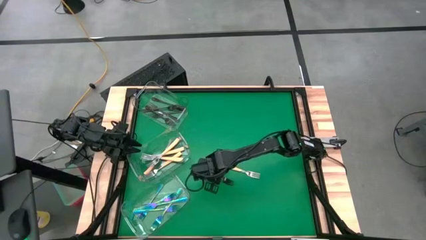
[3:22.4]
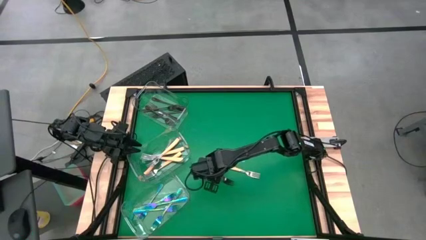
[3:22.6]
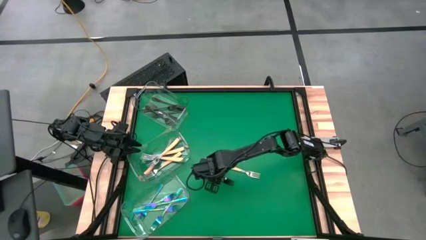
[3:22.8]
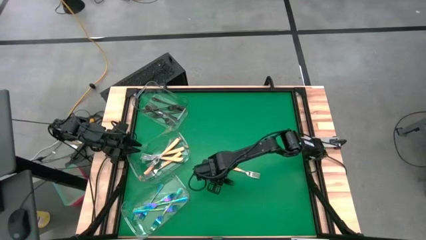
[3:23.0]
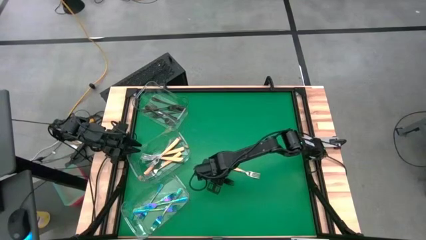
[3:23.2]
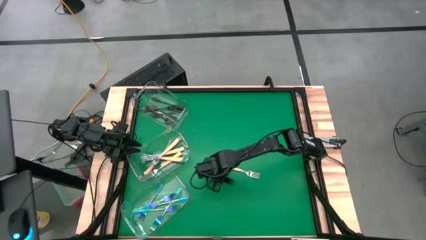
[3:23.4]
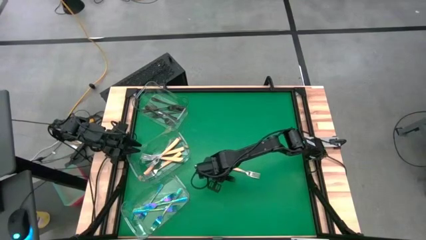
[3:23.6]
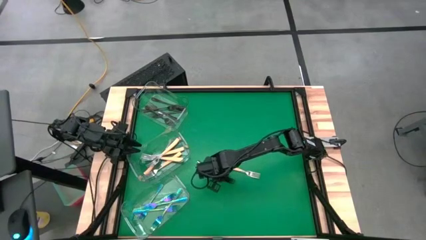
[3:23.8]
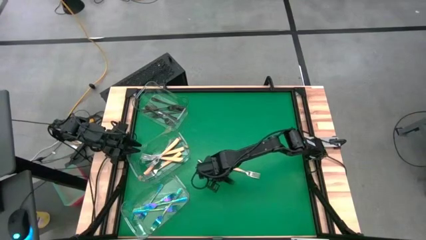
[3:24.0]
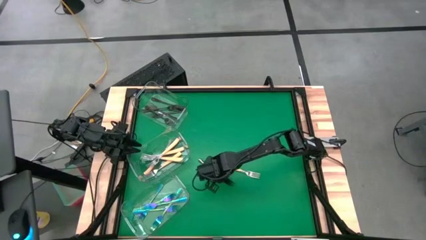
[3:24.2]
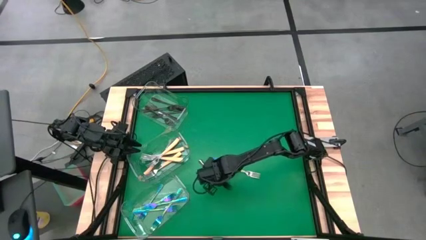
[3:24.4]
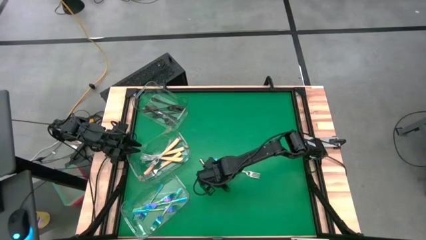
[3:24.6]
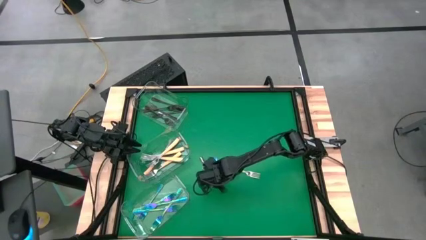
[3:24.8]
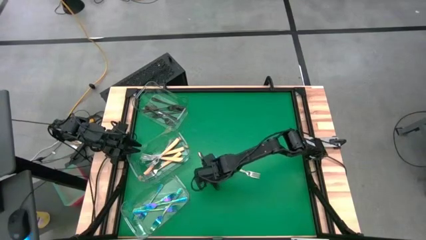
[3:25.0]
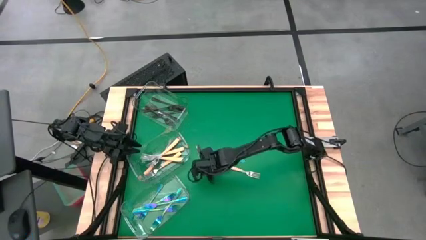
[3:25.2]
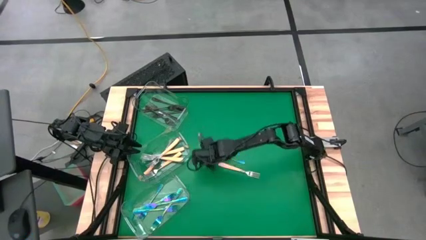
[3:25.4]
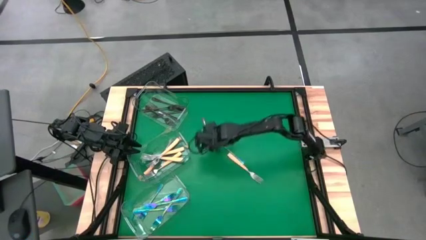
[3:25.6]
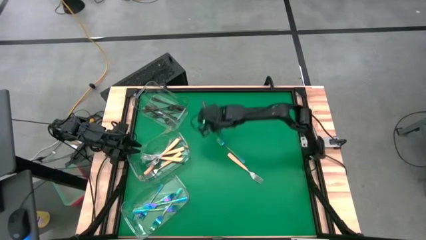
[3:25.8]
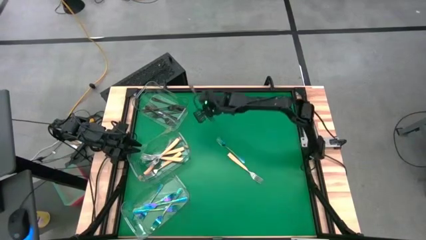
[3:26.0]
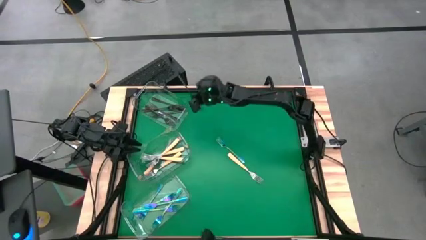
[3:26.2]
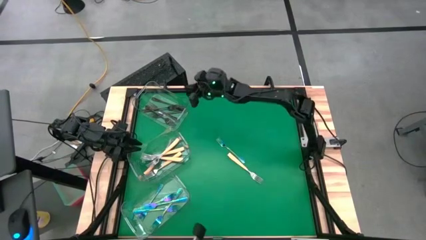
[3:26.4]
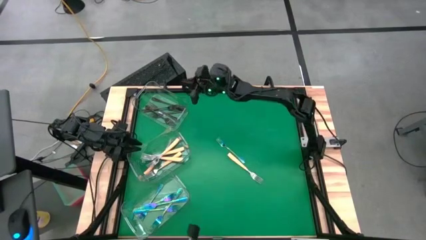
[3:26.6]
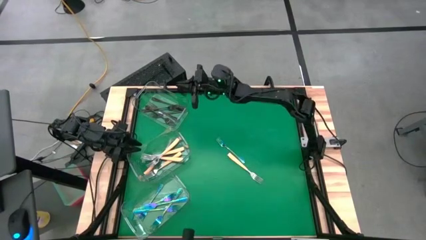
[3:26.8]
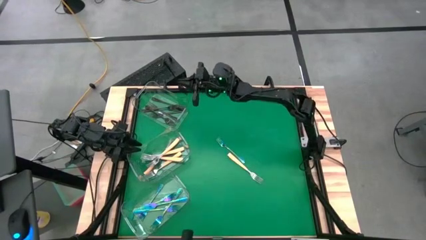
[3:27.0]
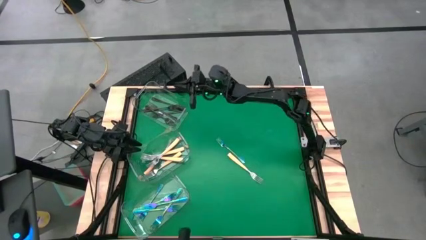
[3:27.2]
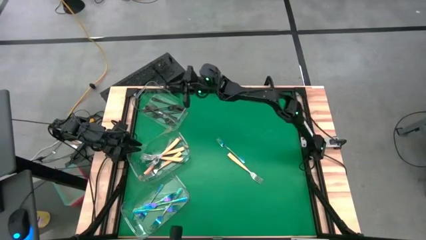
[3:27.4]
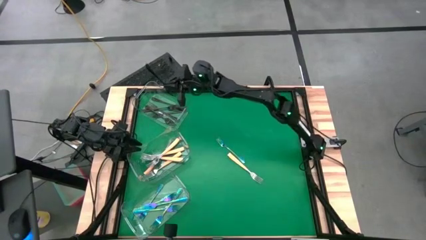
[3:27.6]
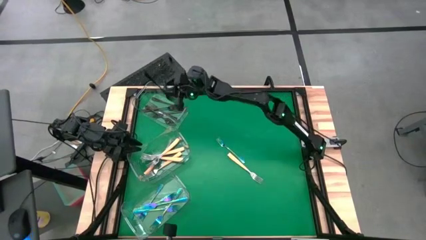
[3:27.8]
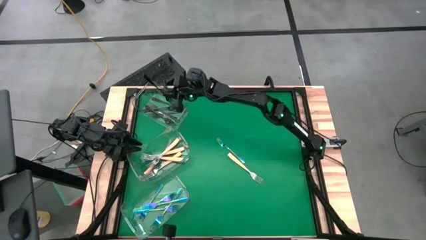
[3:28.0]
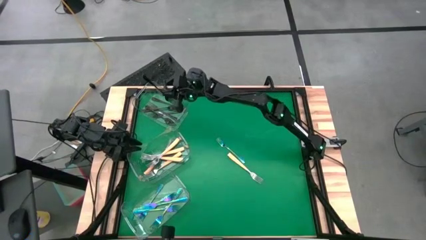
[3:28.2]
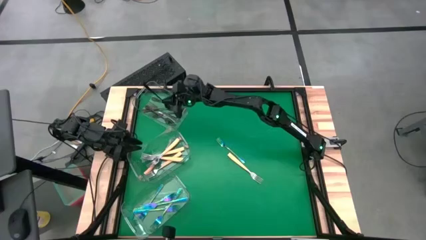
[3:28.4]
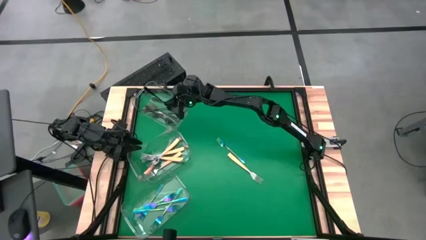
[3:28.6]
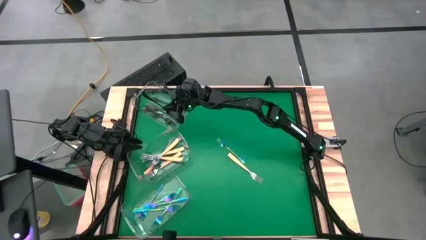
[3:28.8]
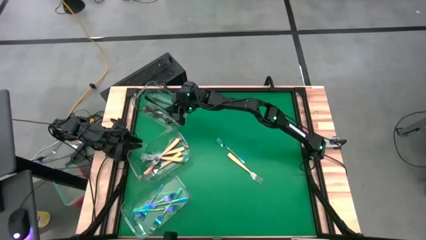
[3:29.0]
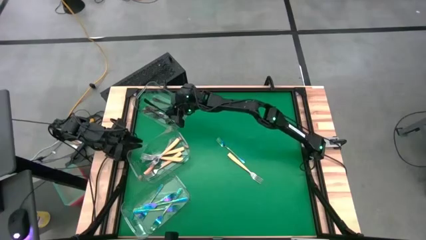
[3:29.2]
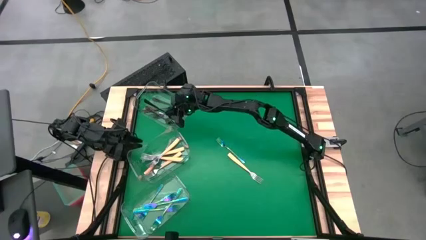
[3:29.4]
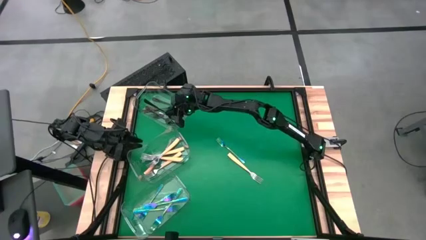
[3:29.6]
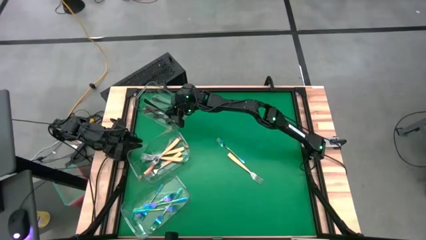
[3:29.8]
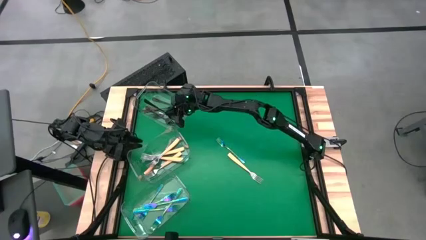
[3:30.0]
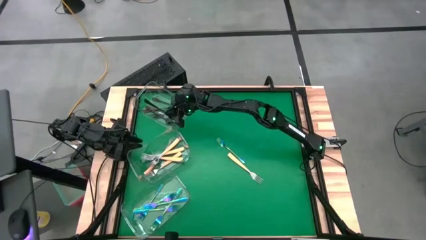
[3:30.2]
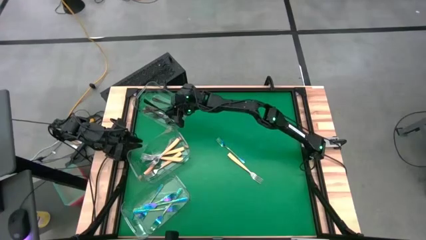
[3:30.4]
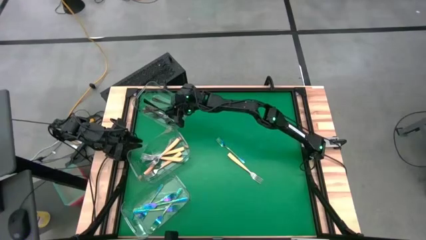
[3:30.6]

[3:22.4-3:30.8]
Task: Sort silverware by color (type)
Put the black fork into the top transparent bin

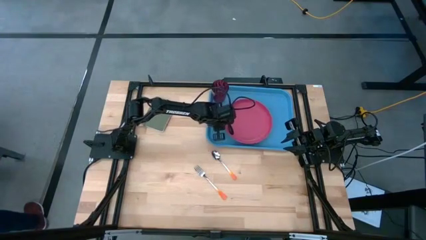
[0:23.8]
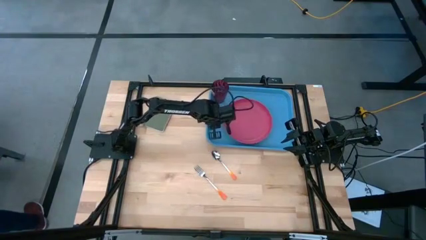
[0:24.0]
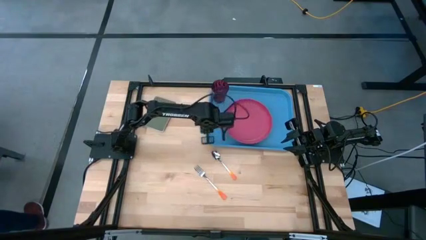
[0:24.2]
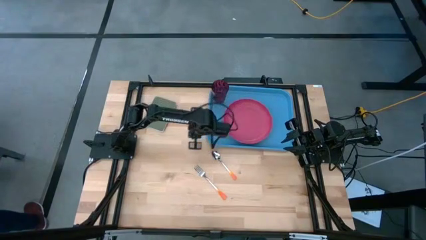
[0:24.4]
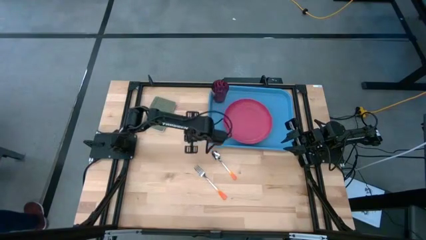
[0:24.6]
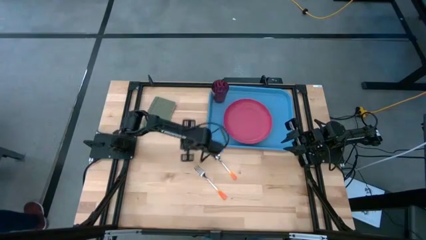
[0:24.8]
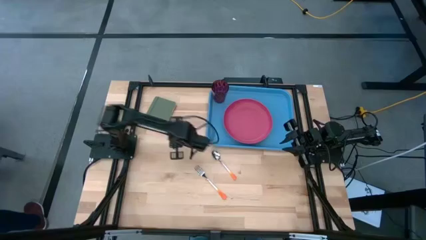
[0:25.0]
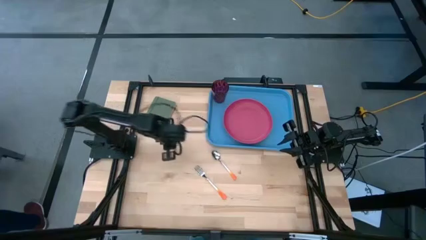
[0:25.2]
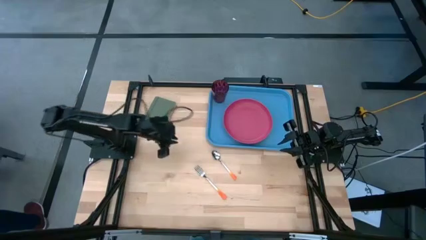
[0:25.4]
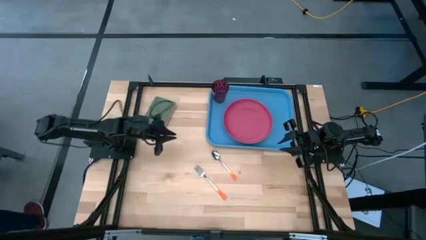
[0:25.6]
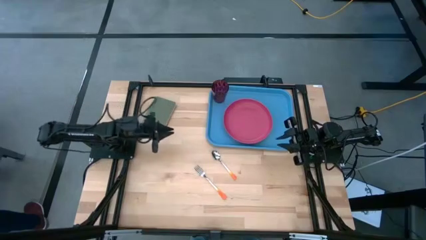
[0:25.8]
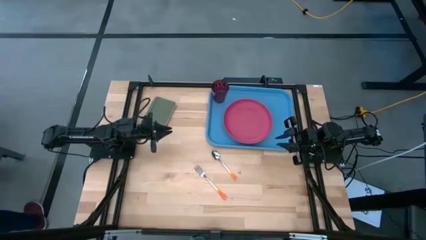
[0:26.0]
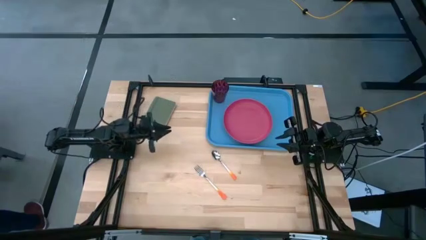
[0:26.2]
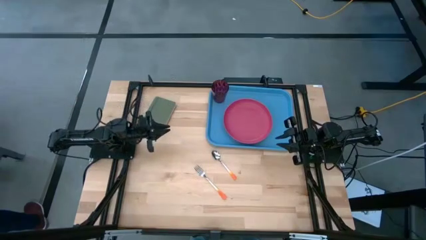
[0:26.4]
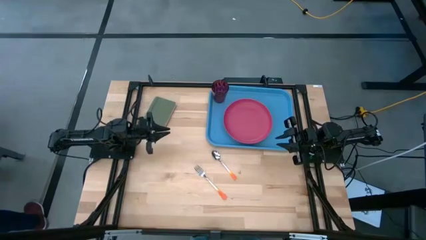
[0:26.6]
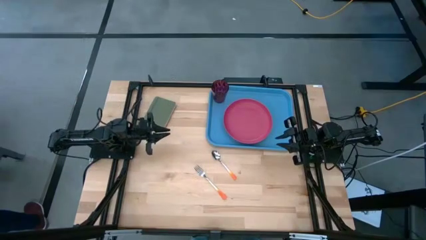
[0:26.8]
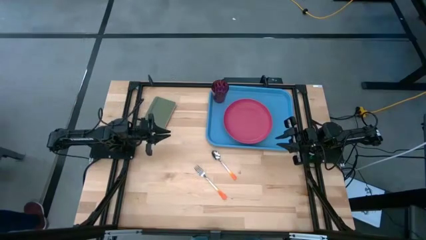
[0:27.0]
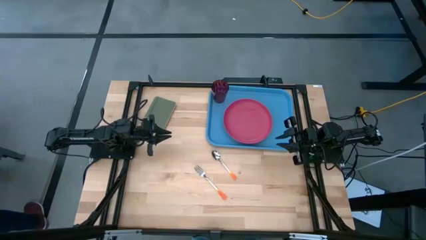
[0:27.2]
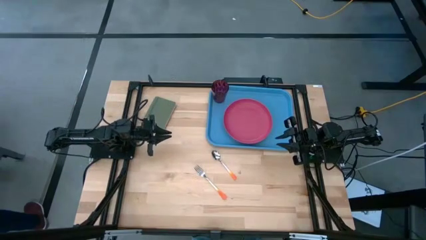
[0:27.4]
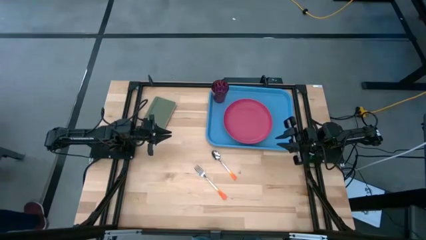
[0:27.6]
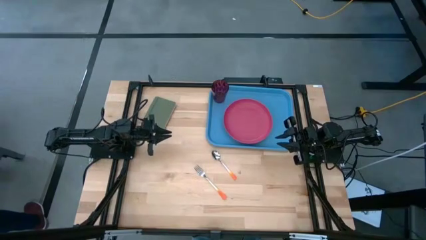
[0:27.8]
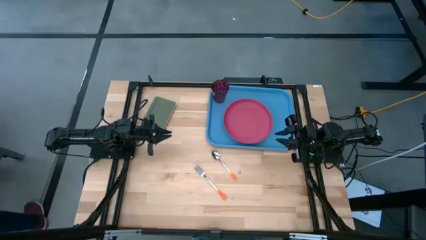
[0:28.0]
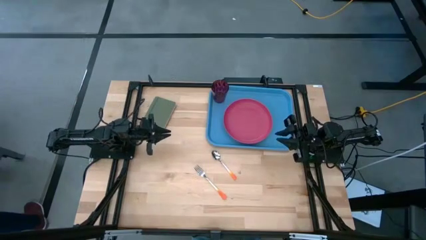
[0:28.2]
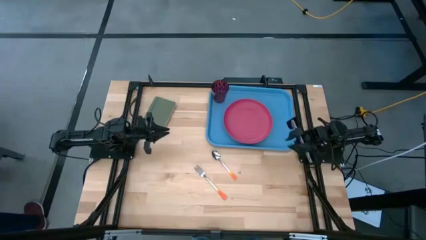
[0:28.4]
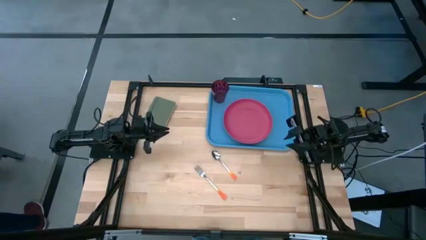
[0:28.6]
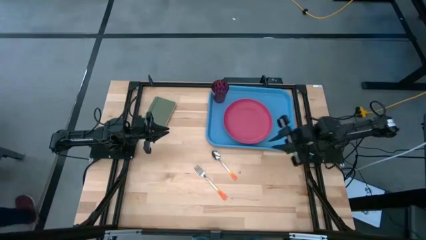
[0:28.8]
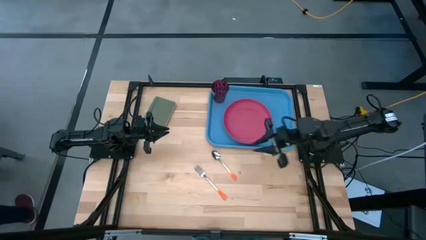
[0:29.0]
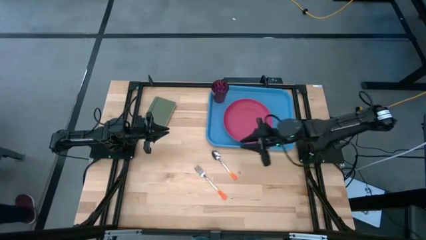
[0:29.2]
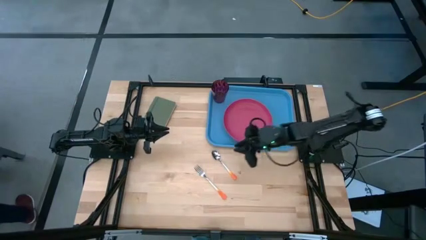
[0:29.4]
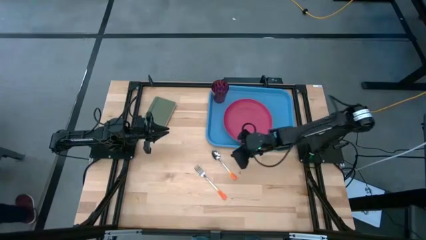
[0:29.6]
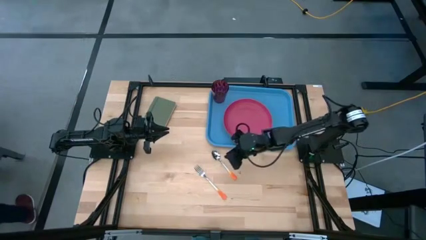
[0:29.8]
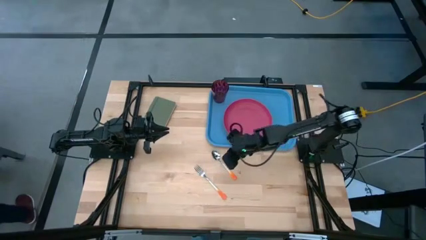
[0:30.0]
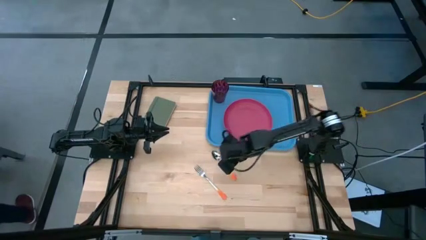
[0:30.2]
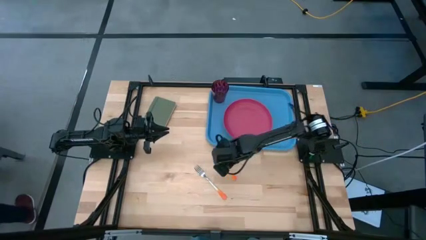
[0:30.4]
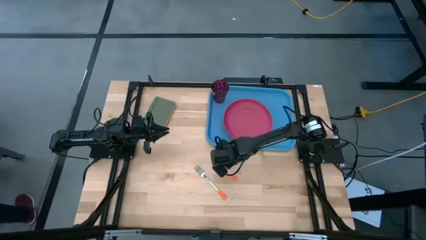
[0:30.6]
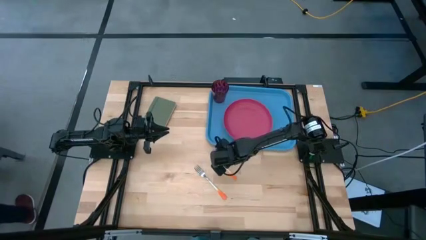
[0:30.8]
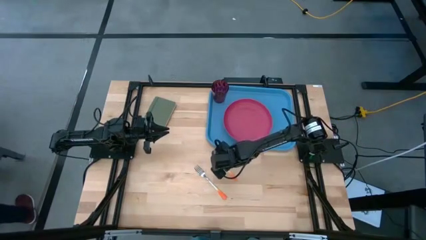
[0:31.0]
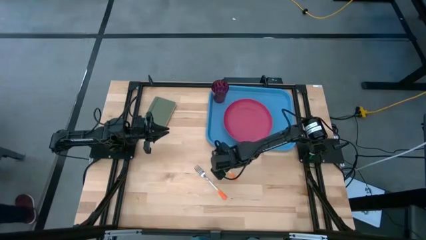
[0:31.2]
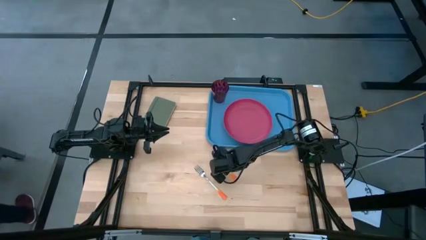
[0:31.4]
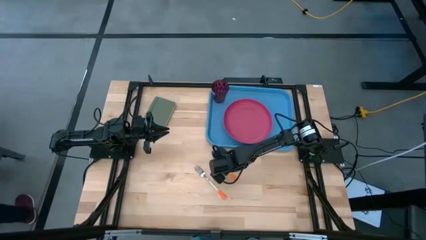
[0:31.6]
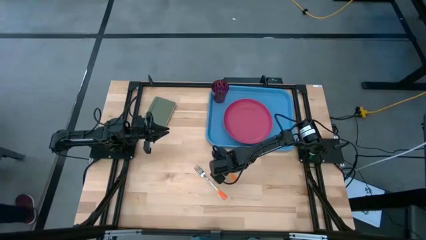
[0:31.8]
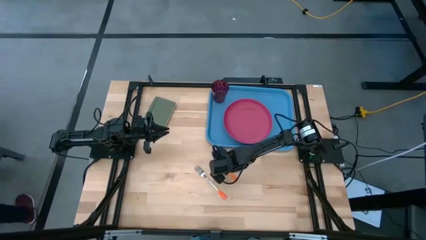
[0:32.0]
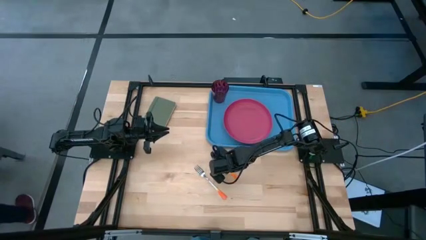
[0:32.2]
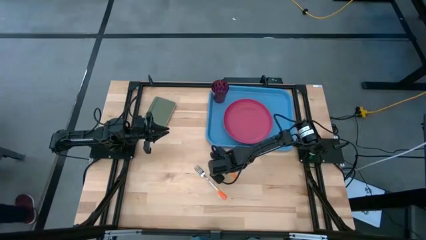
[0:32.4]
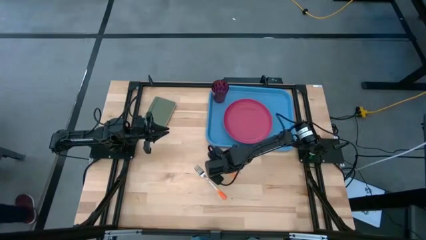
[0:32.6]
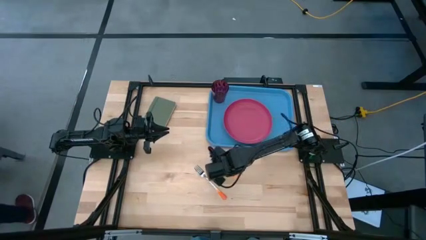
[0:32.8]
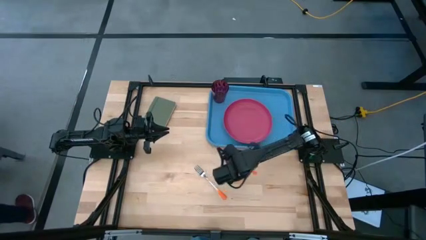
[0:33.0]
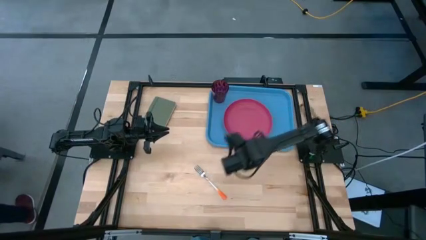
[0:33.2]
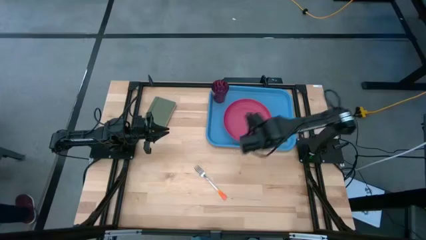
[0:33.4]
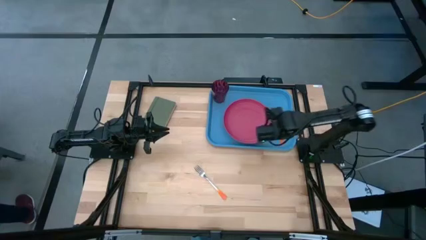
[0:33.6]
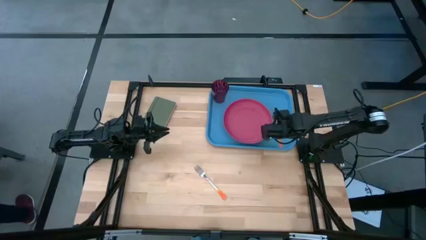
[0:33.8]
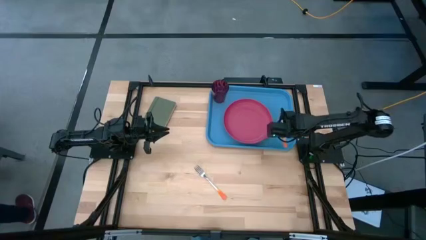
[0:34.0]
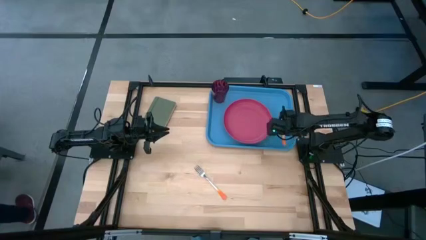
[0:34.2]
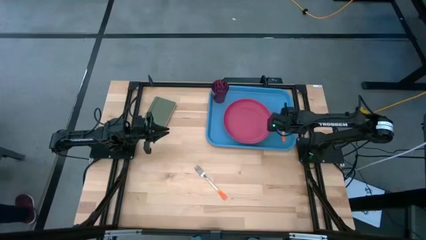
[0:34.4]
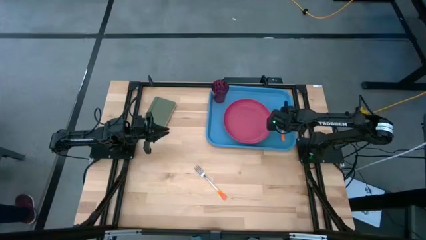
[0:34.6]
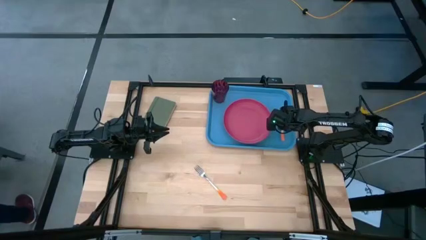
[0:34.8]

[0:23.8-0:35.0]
Task: Pick and place plate/cup/fork/spoon on tray
Put the orange spoon on the blue tray to the right of the pink plate
